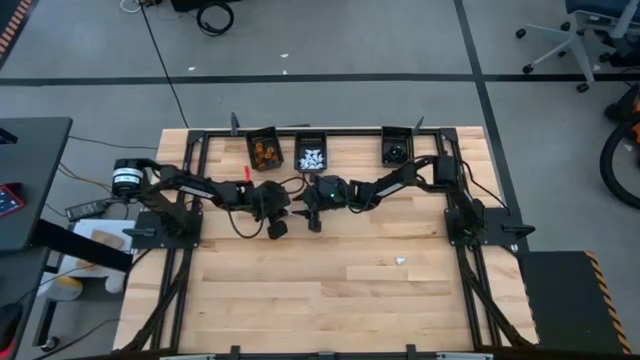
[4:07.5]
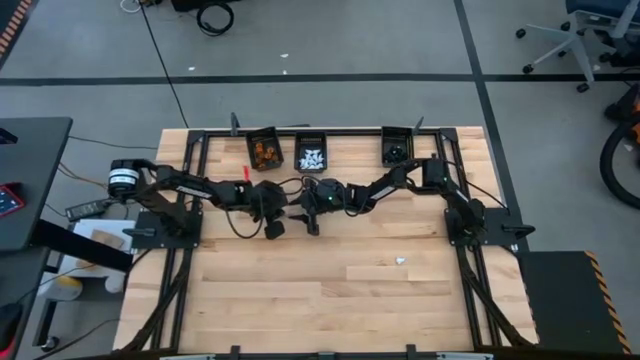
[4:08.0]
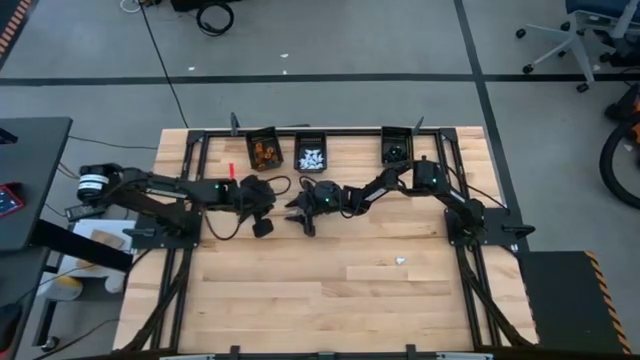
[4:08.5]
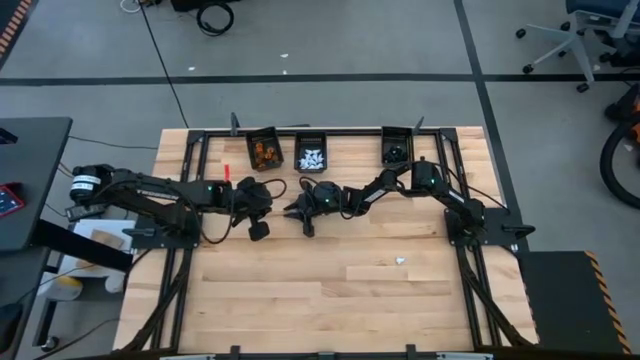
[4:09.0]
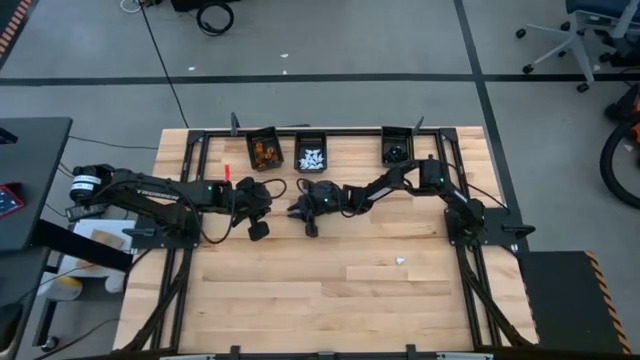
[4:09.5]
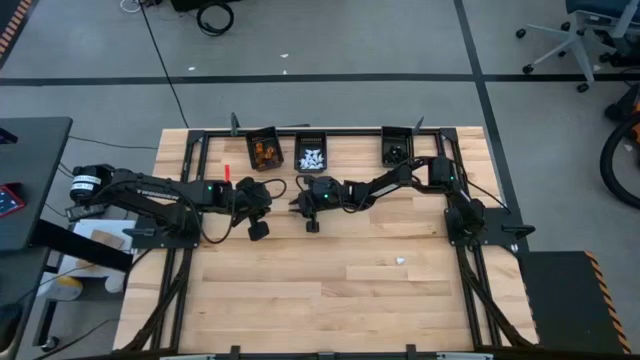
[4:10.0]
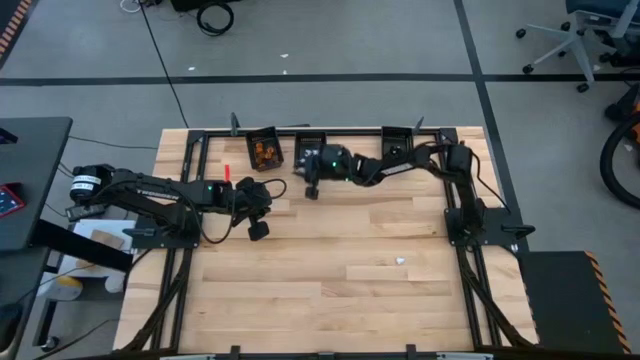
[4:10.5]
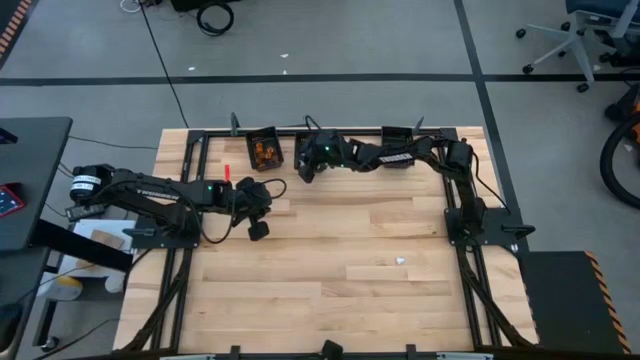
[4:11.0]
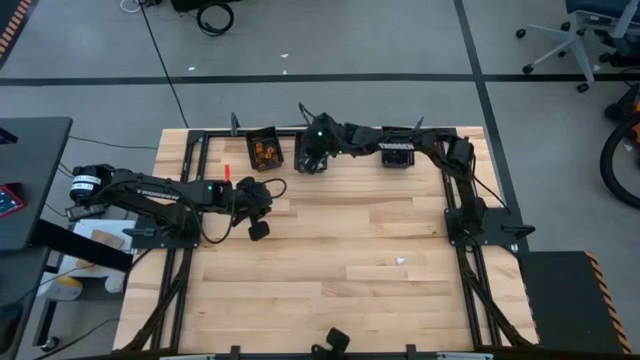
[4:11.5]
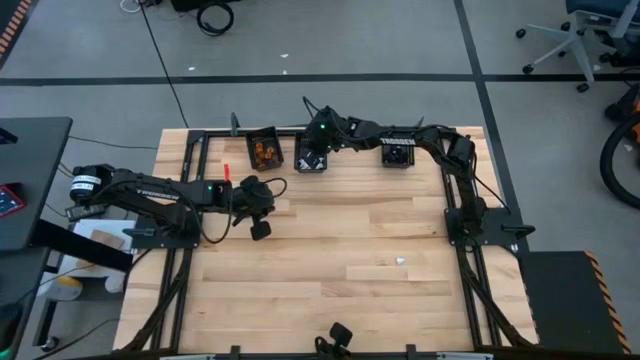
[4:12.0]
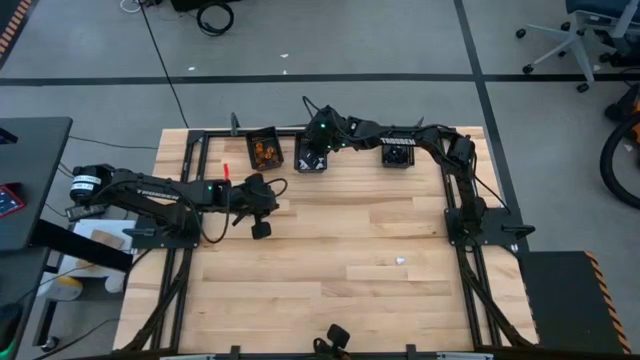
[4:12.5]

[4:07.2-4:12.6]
Task: Sort Halloween decoration
Put the white ghost toy into the middle black bin

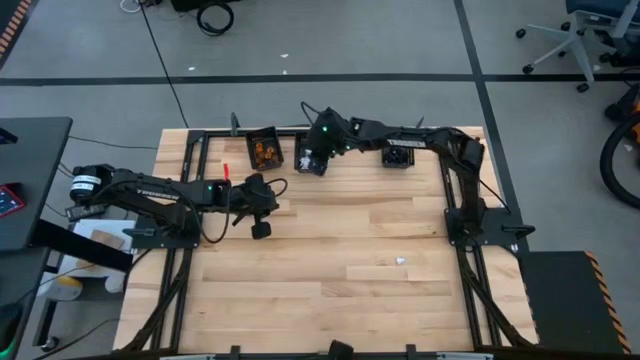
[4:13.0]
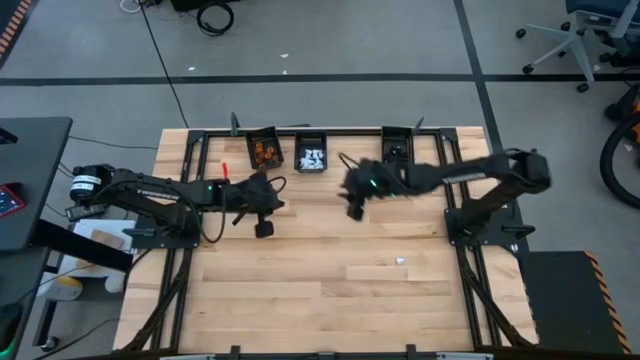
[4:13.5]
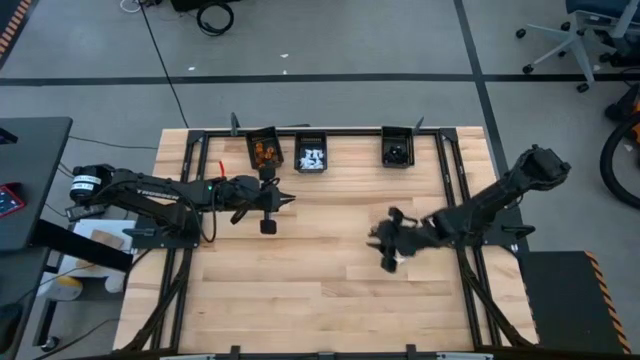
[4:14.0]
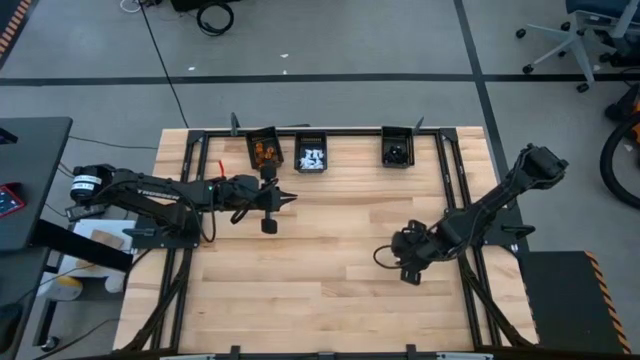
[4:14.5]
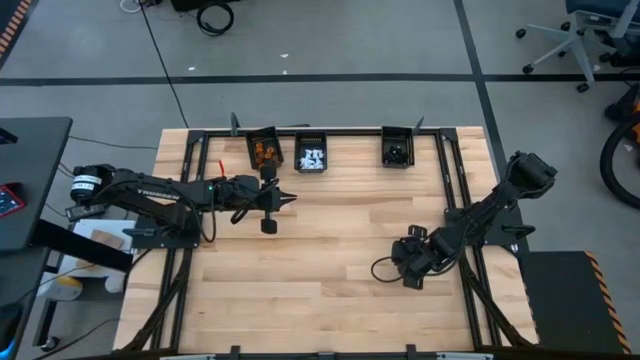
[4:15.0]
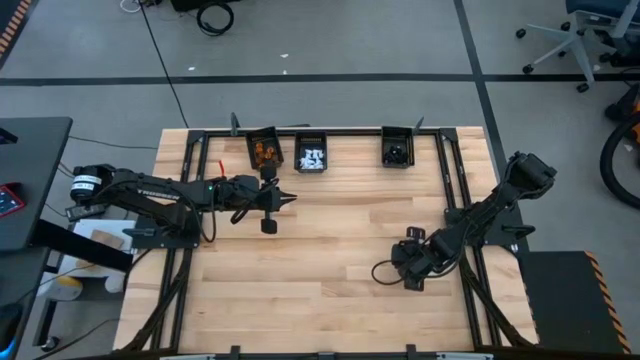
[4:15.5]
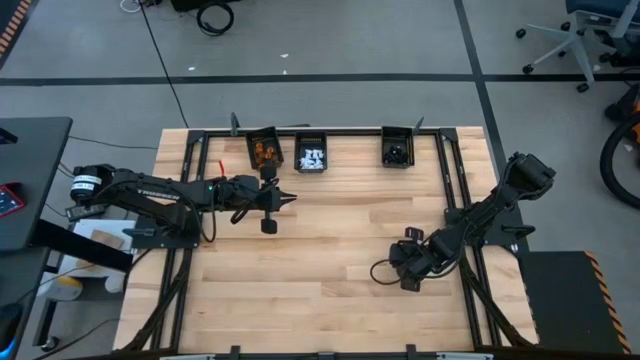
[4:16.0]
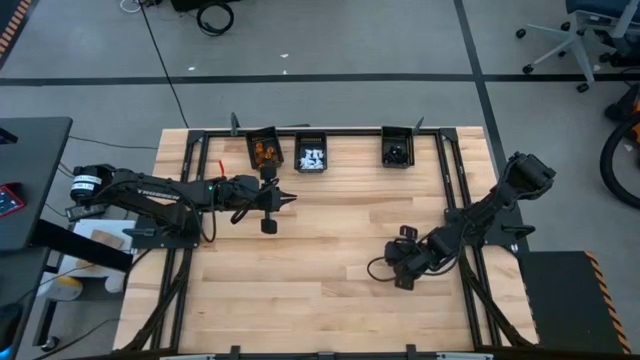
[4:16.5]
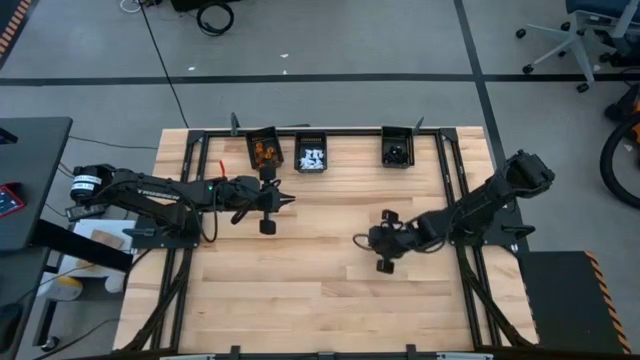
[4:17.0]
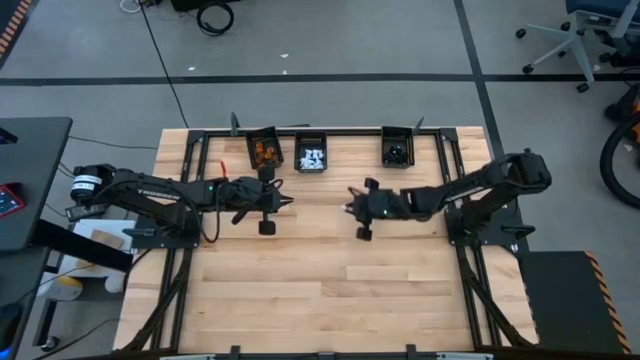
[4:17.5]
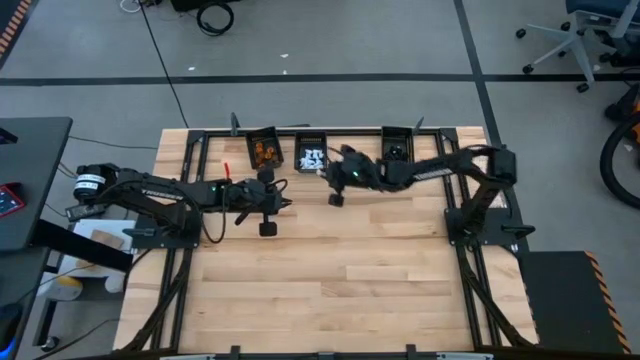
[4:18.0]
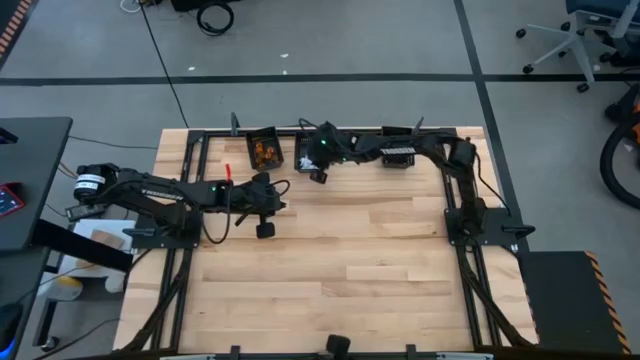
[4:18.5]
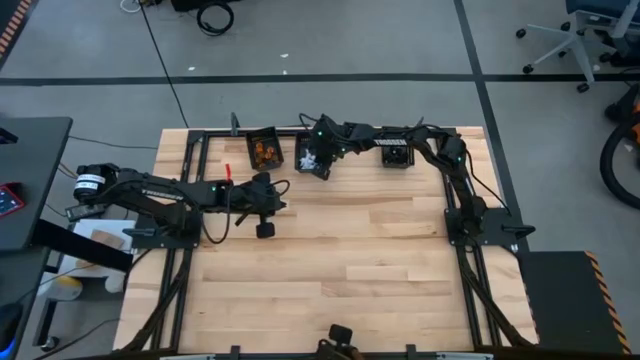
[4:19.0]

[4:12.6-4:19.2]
Put the white ghost toy into the middle black bin

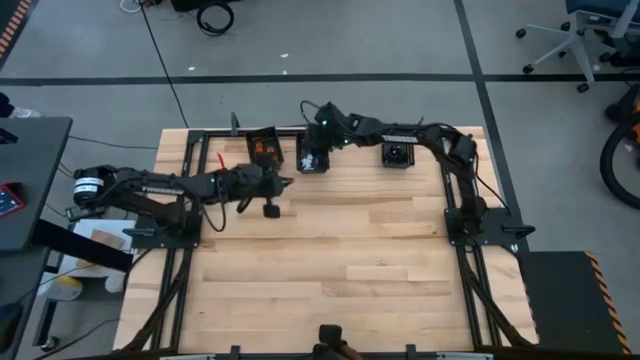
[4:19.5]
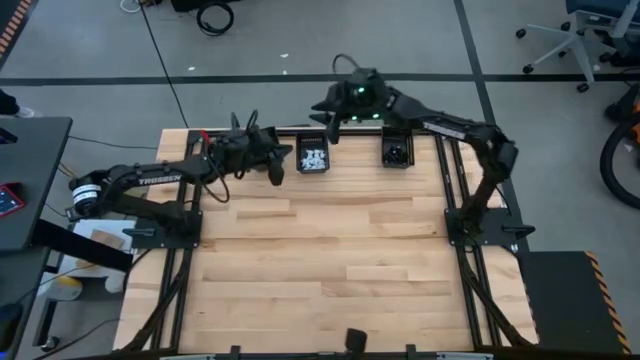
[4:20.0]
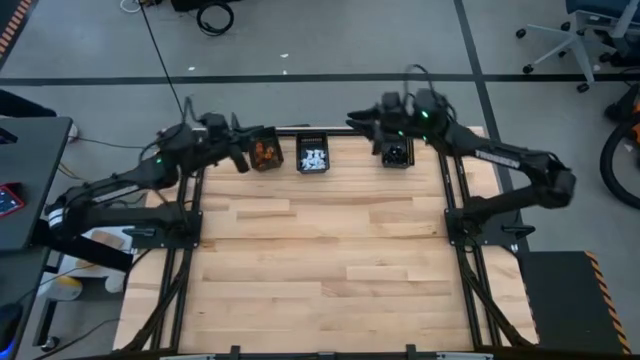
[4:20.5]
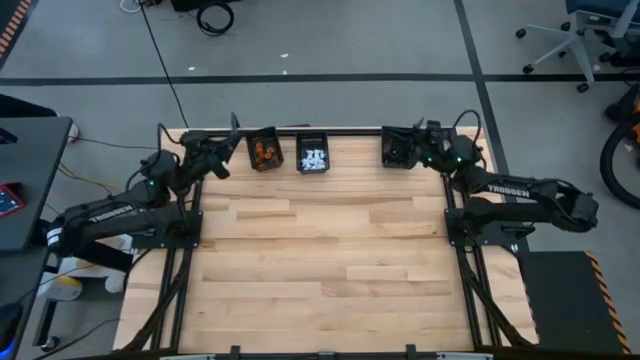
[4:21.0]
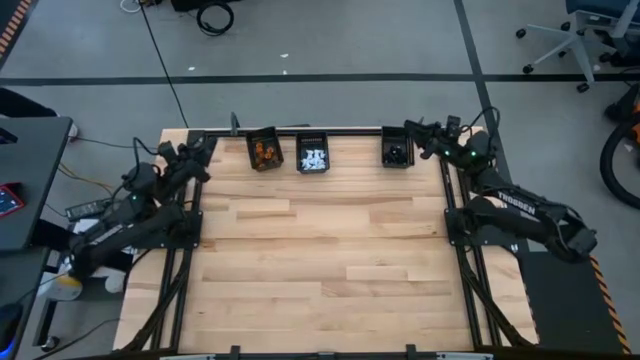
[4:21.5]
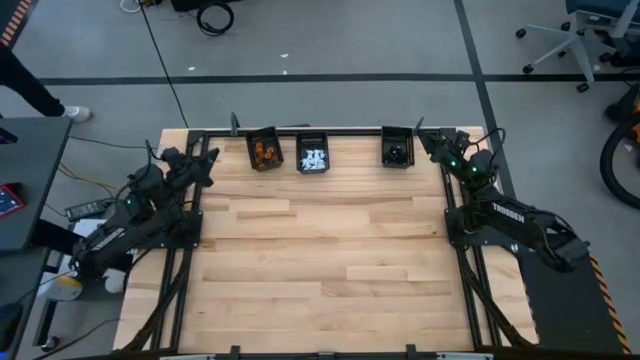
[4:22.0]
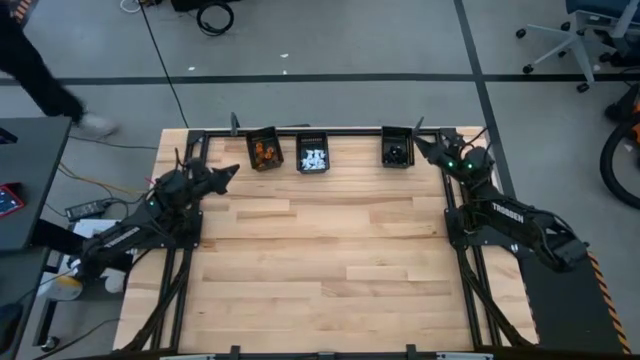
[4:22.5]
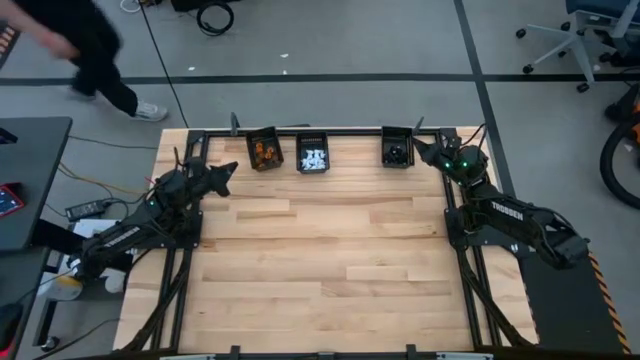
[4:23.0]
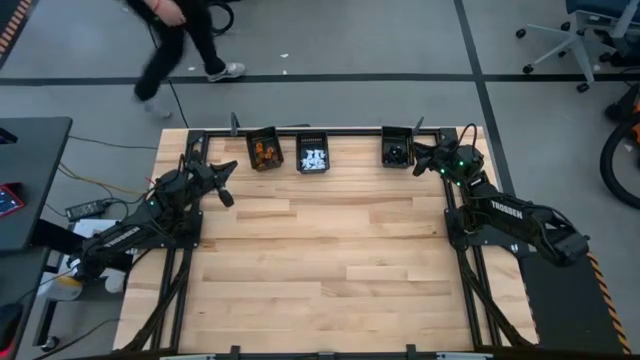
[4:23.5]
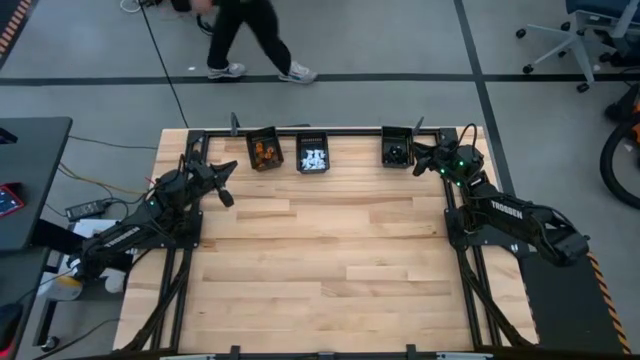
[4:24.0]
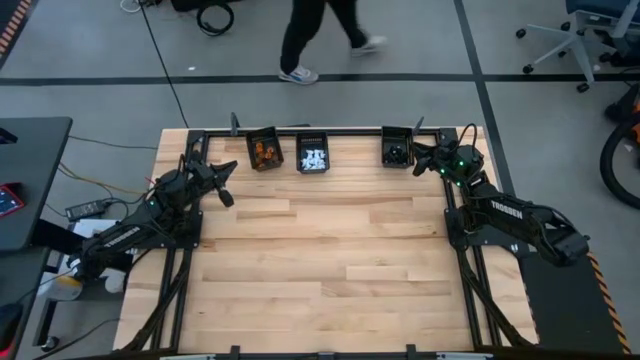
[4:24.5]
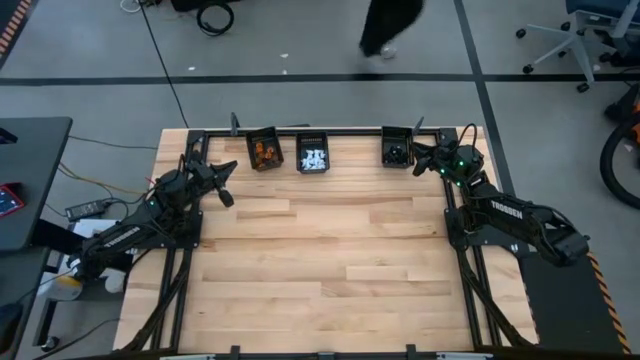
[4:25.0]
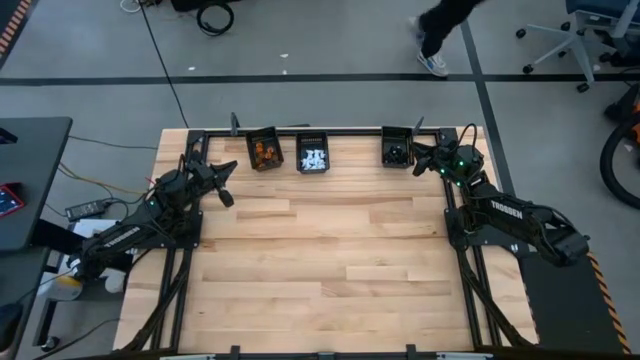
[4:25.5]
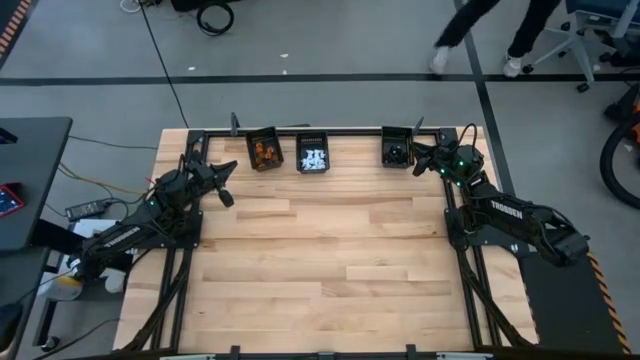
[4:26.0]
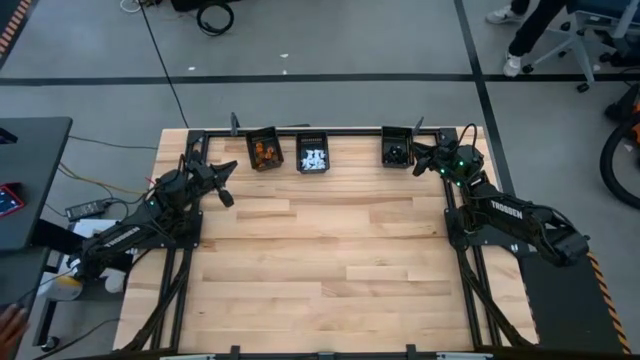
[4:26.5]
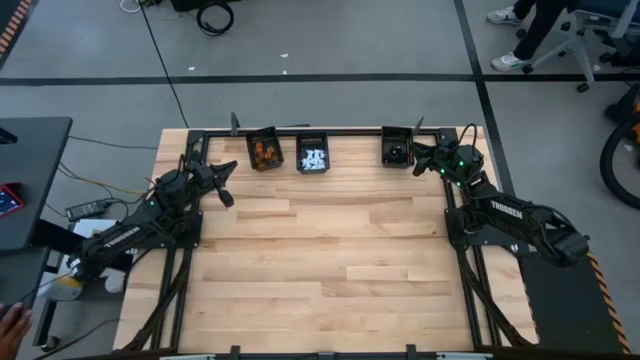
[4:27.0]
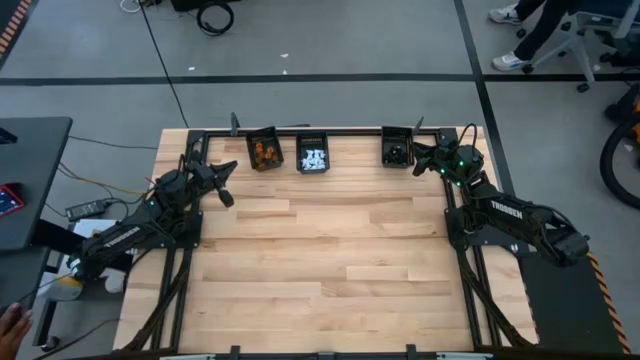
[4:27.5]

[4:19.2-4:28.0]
Return to Home Position

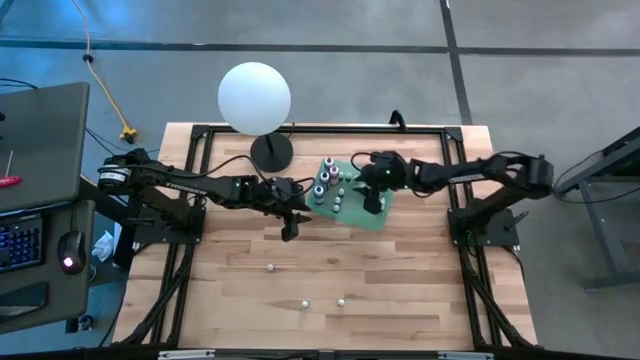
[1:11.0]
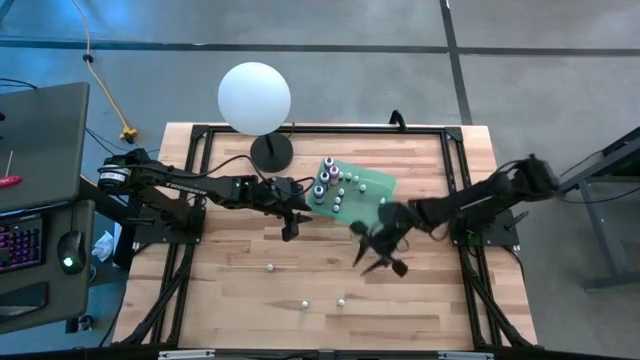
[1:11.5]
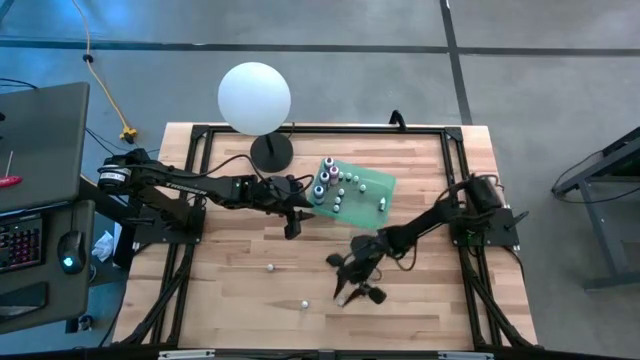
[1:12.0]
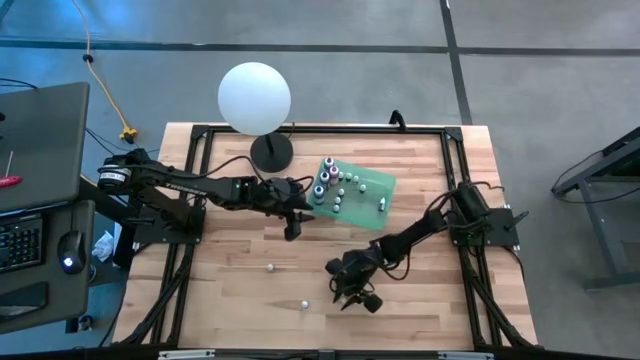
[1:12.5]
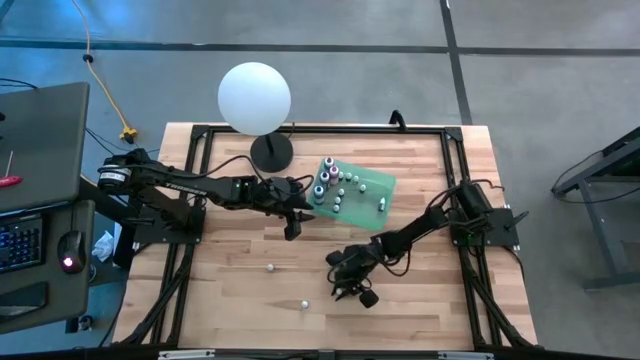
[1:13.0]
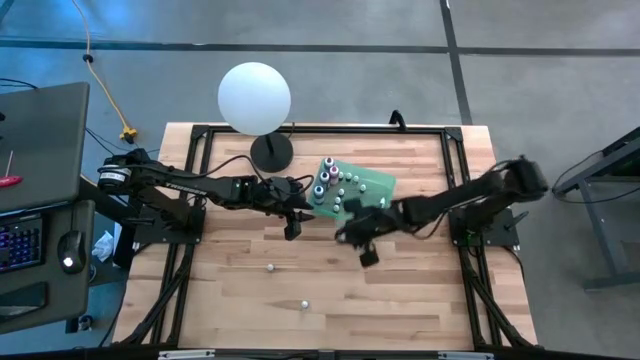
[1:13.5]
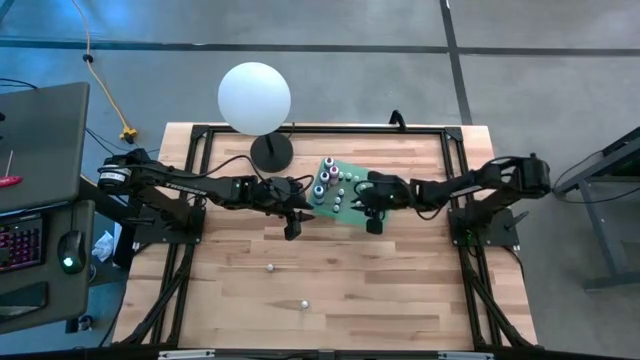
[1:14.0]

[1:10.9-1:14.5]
Task: Pick & Place food coloring
Put the small orange food coloring bottle into the green container
